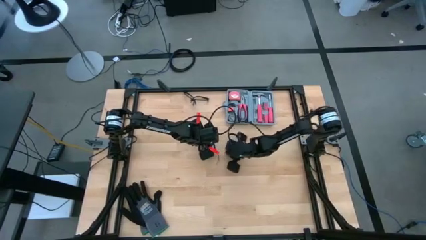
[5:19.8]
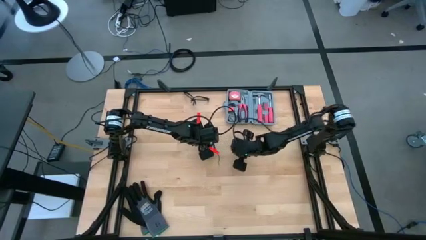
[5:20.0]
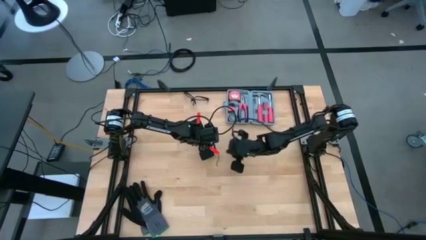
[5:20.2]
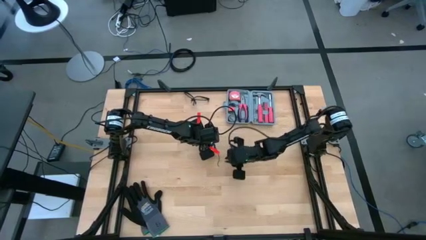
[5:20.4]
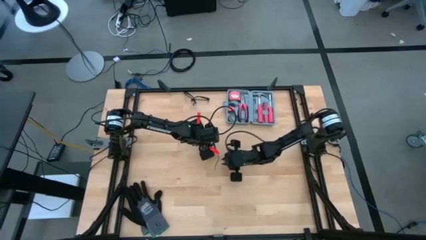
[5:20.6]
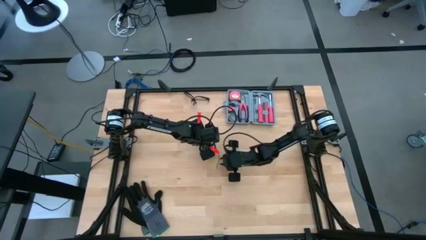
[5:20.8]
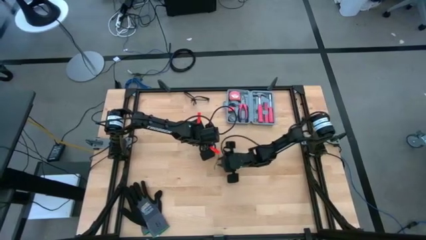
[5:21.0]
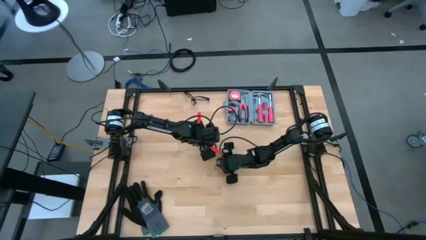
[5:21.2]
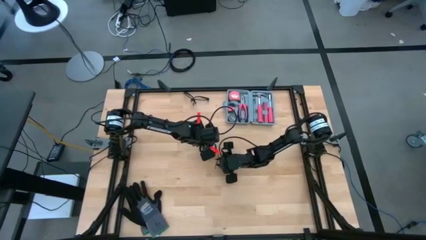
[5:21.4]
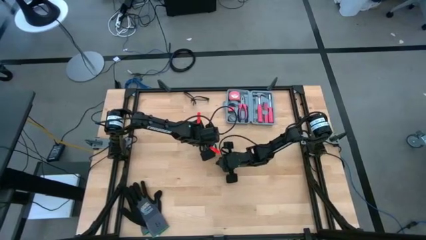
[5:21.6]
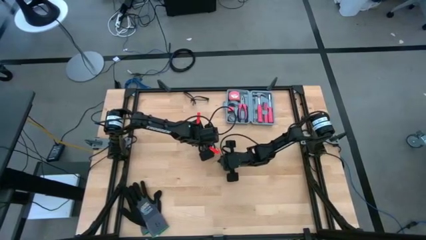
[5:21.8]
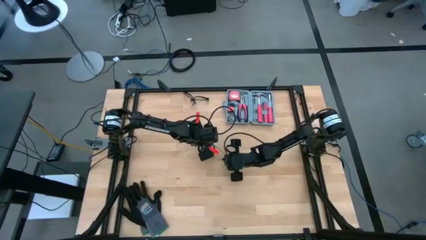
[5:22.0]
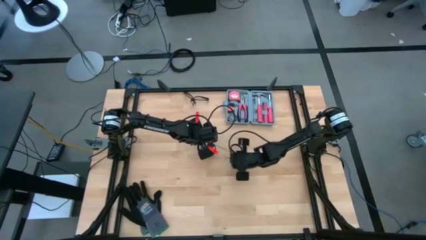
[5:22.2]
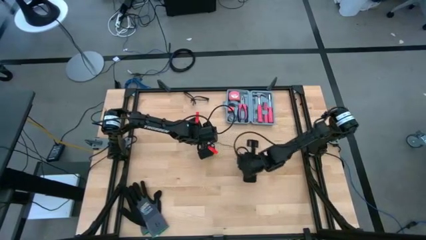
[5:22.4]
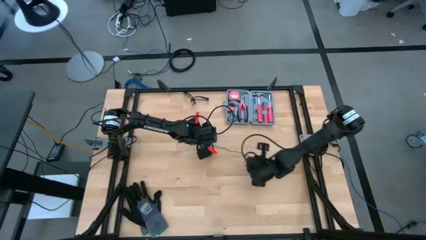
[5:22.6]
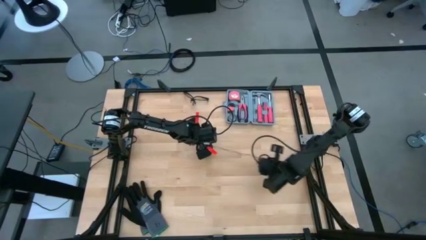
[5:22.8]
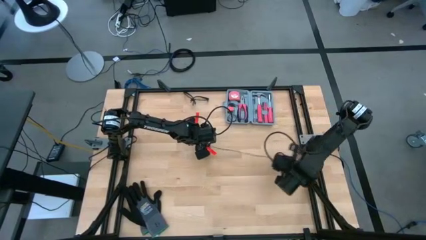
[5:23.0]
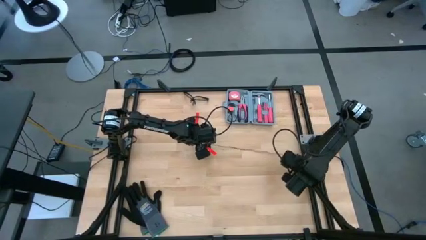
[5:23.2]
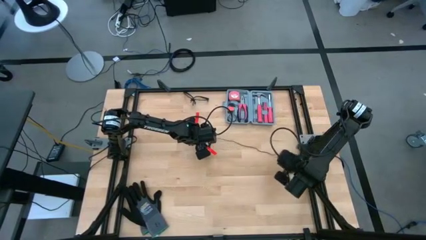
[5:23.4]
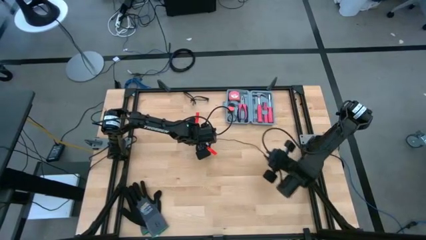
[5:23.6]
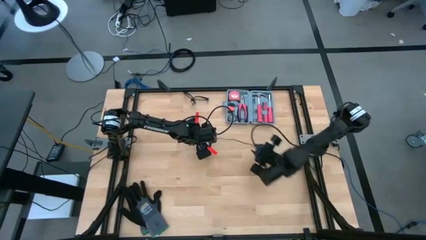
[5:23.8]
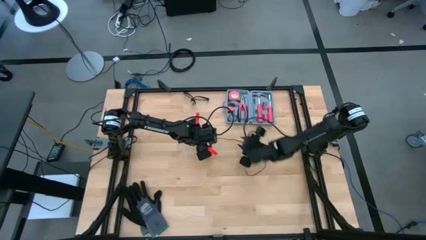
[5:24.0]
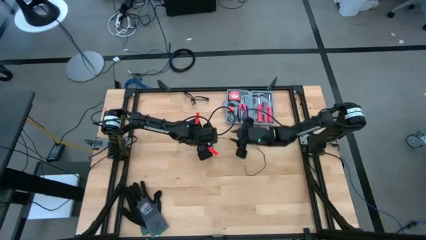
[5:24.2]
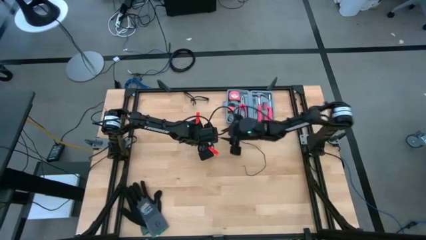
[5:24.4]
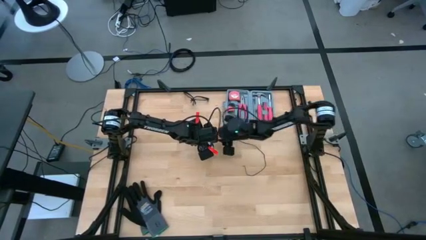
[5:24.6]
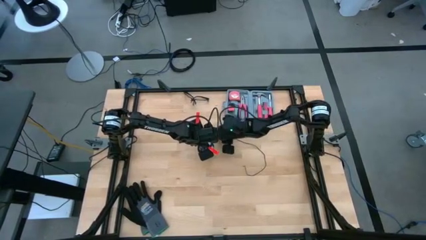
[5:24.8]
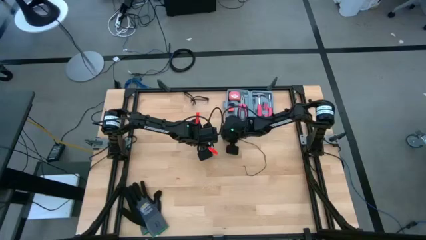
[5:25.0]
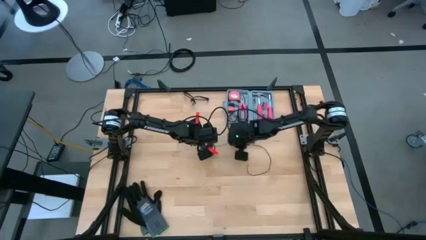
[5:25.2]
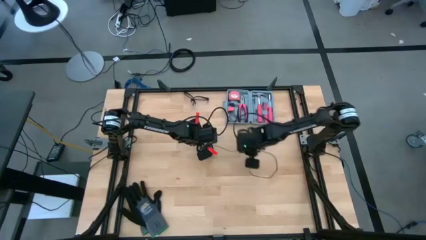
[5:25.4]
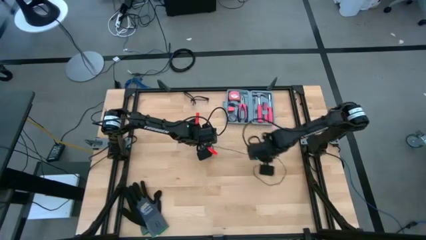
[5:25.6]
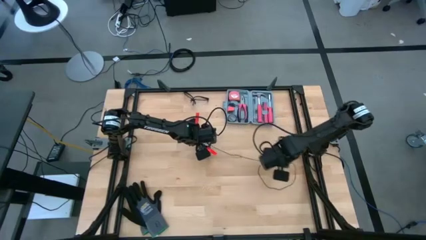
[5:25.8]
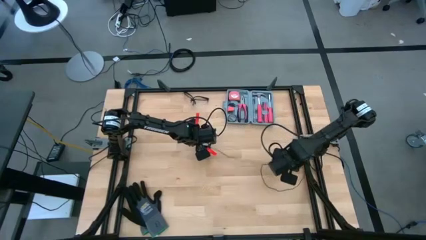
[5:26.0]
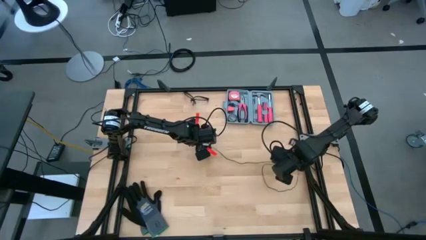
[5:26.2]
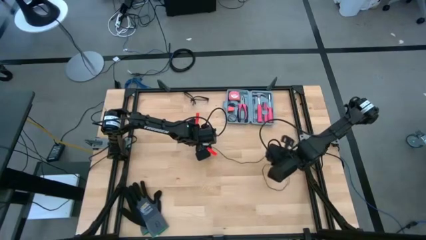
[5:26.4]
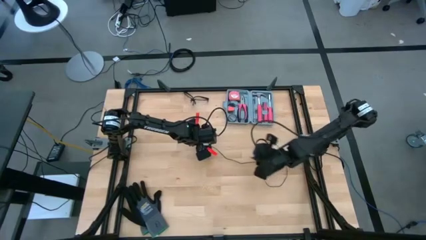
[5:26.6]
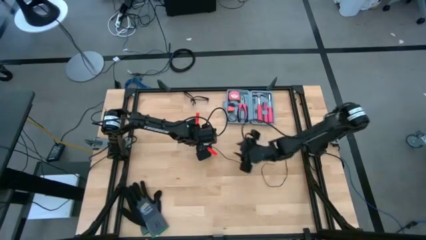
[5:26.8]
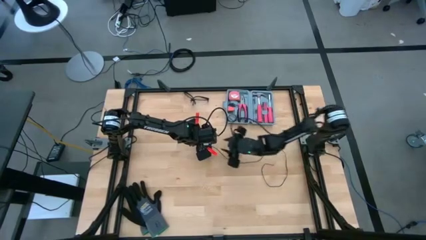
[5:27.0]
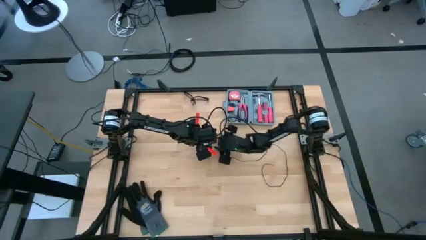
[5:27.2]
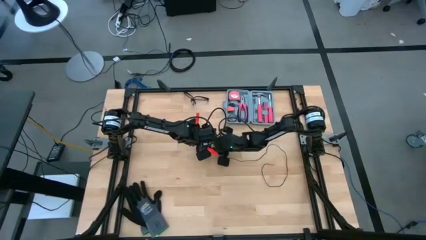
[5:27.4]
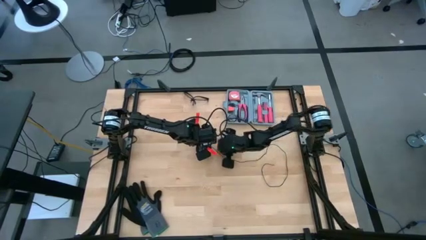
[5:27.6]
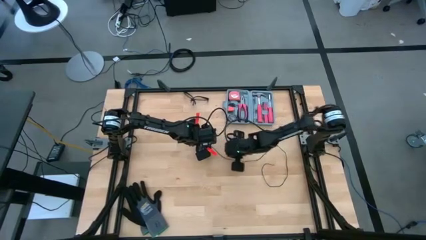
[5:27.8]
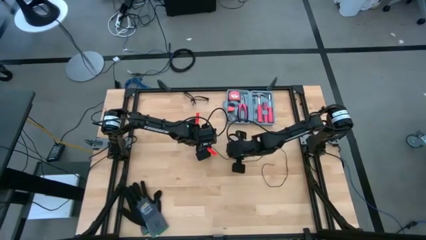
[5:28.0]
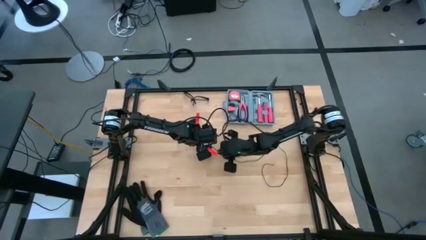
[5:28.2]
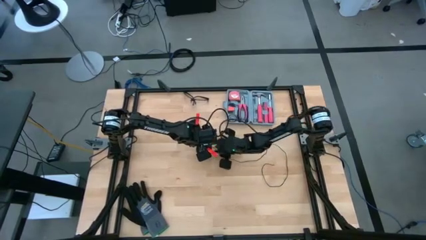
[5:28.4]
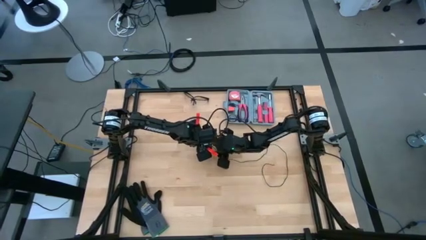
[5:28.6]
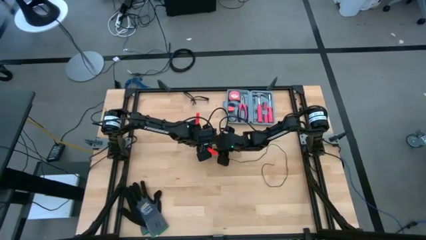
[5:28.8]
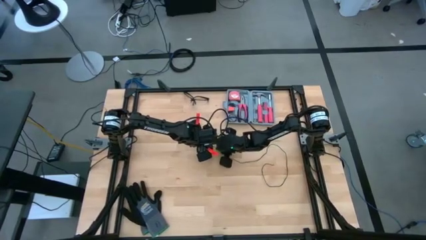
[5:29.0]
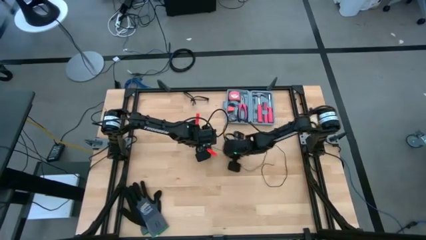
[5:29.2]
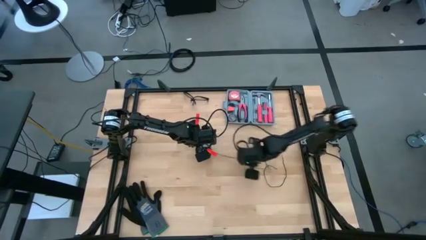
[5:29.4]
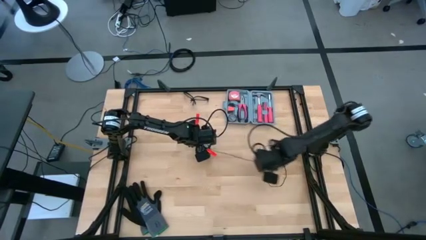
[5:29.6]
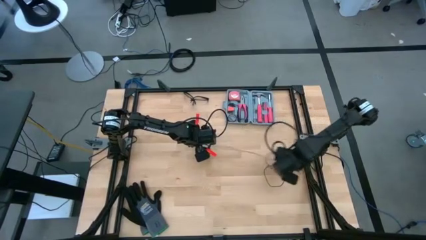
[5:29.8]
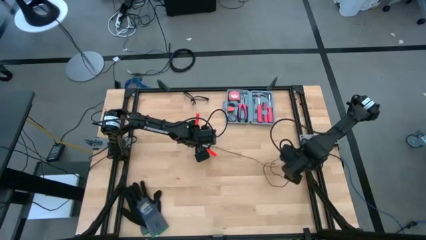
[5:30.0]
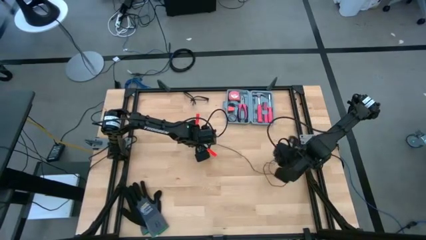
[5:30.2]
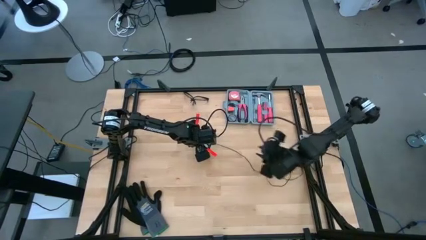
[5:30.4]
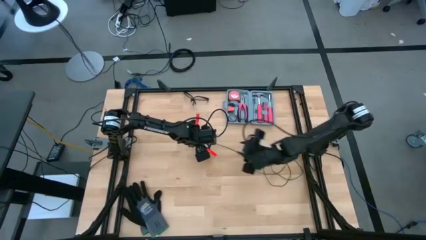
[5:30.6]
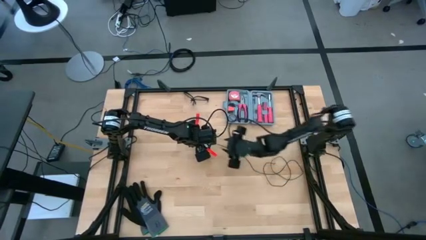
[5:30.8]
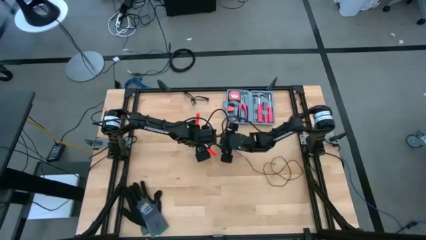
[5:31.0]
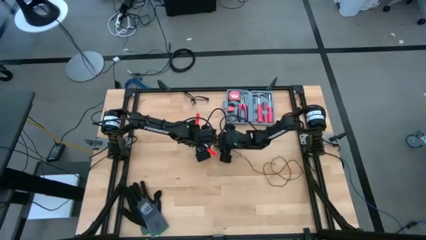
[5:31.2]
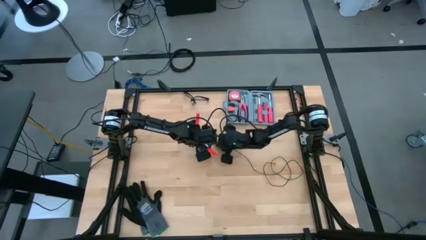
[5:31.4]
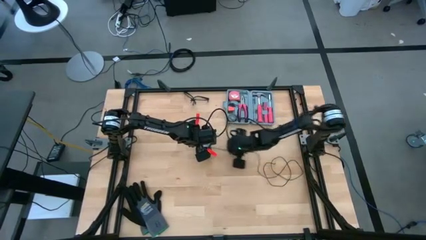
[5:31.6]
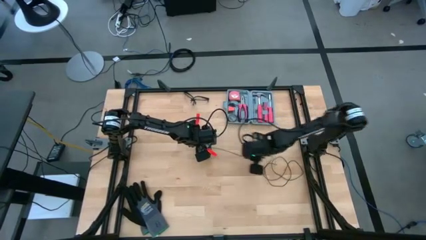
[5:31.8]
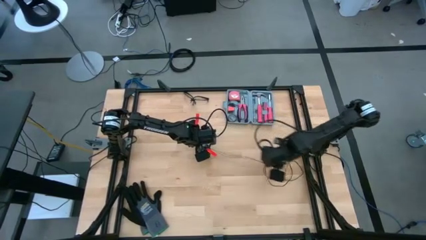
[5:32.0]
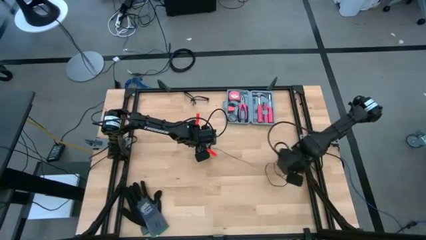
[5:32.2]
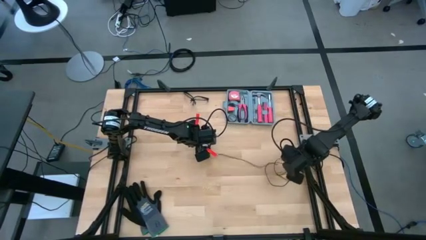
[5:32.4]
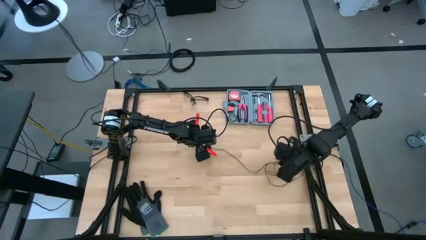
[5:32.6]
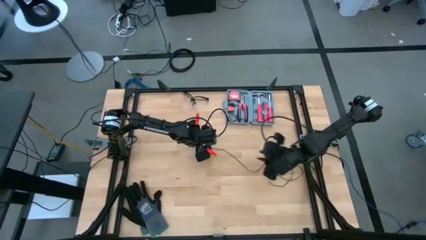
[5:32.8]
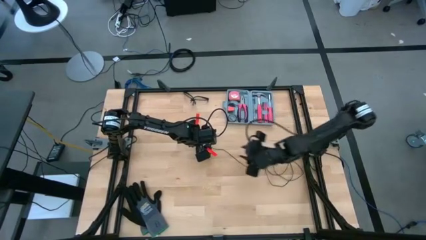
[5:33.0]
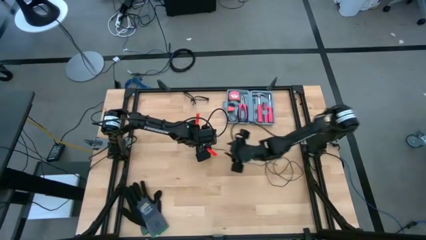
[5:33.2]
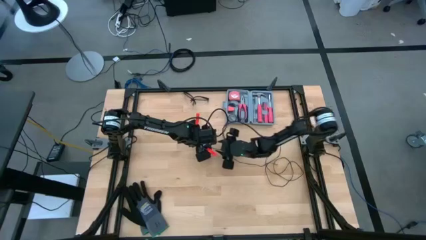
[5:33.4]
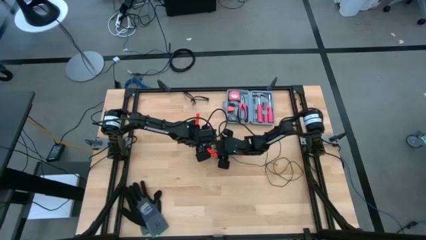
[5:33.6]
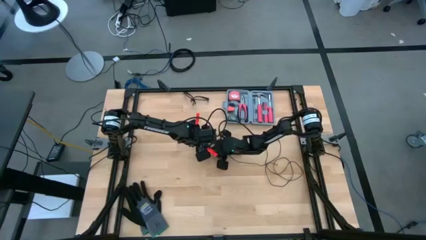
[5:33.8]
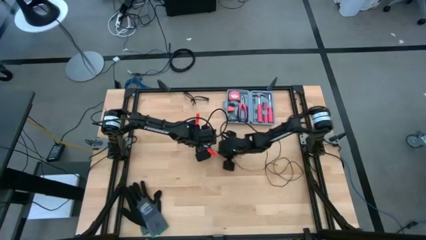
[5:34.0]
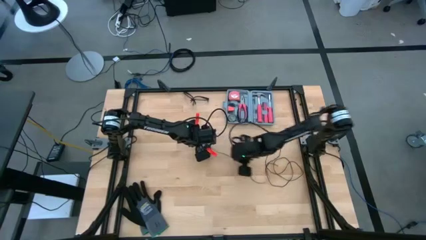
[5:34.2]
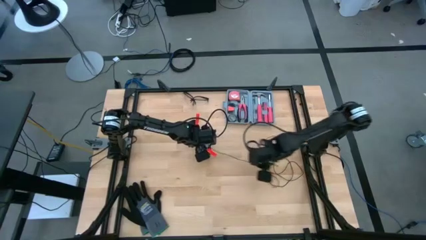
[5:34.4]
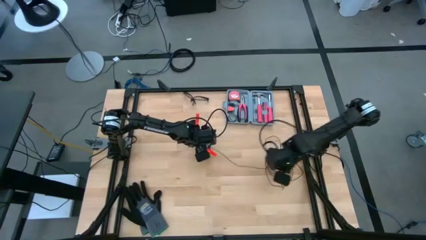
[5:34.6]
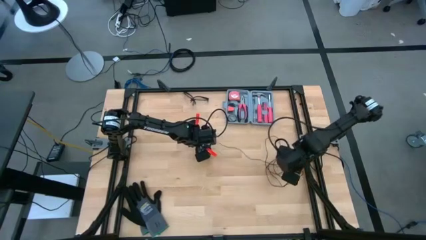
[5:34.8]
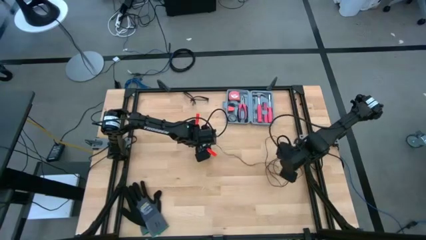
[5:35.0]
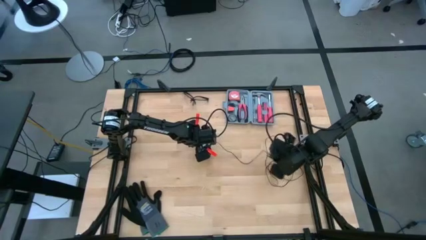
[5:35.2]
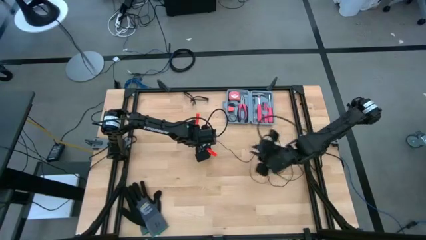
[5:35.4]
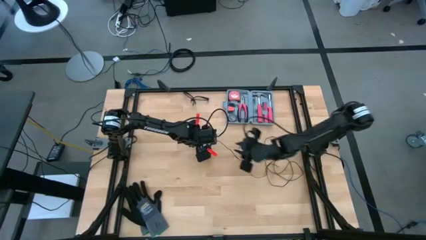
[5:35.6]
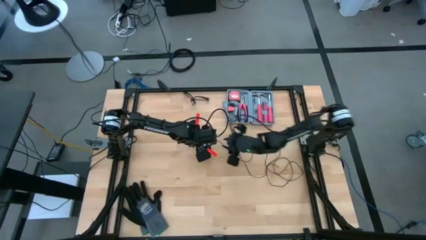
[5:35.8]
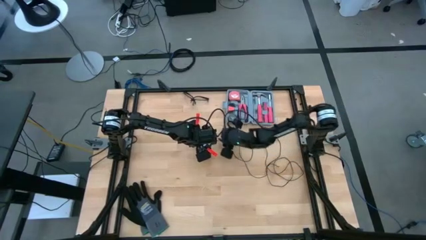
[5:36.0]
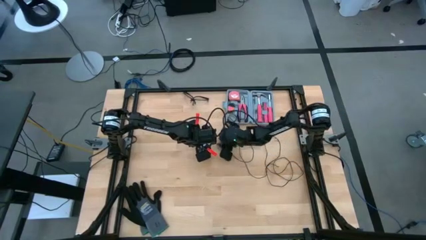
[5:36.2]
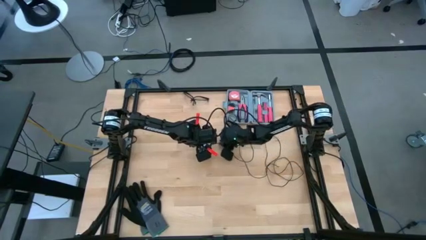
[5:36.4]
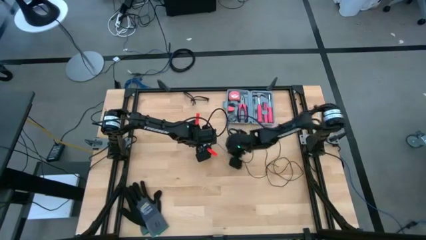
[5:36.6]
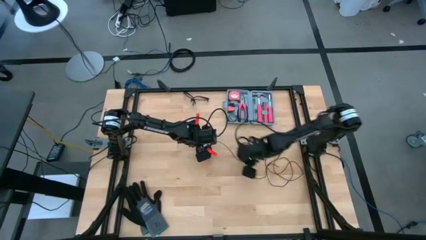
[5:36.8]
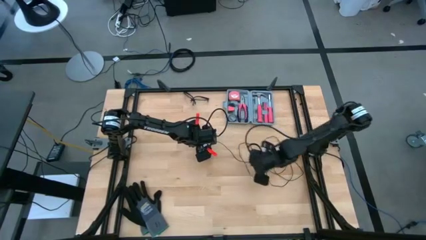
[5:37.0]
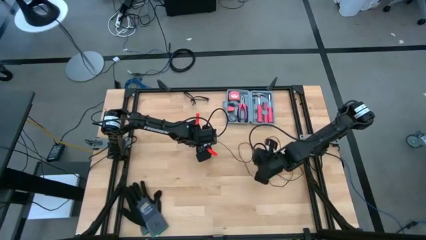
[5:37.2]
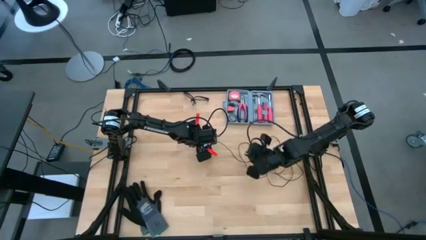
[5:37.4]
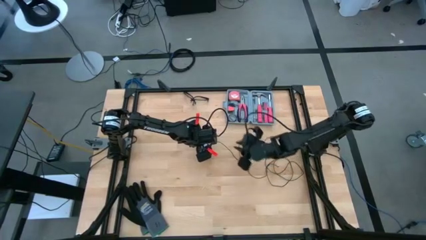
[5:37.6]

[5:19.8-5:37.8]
Task: Coil cords
Uncoil the black wire from the spool
